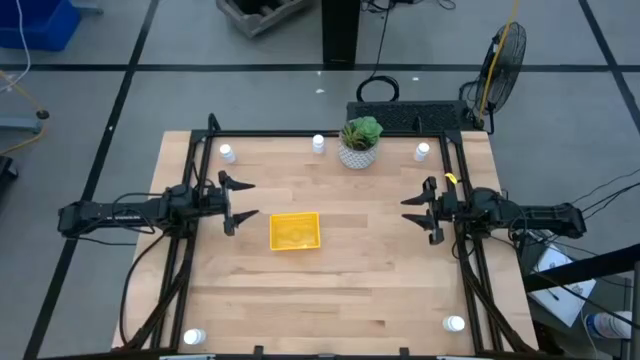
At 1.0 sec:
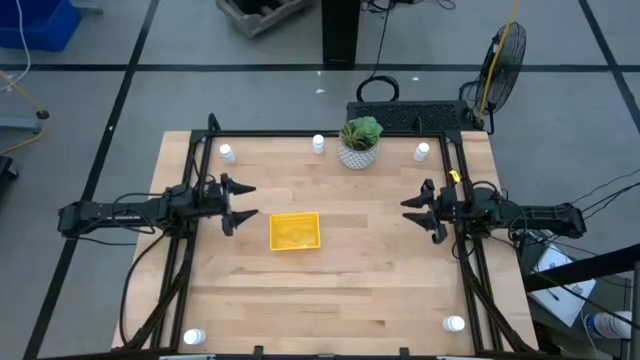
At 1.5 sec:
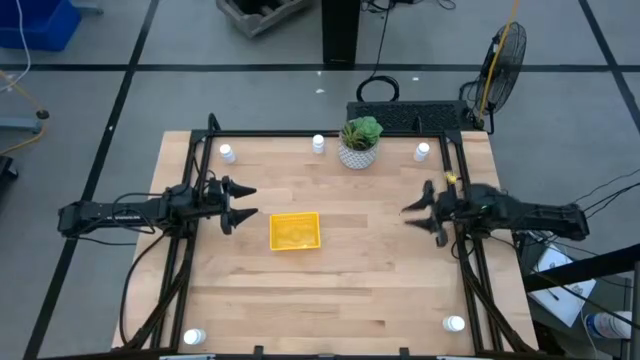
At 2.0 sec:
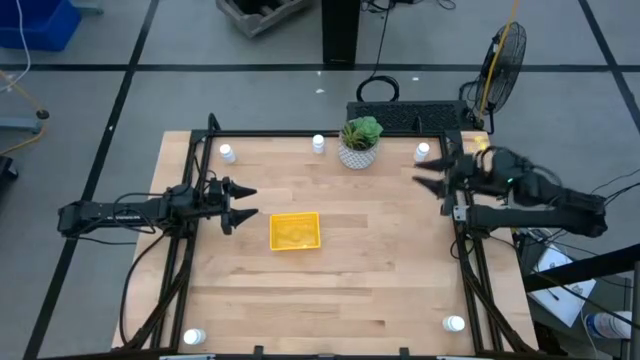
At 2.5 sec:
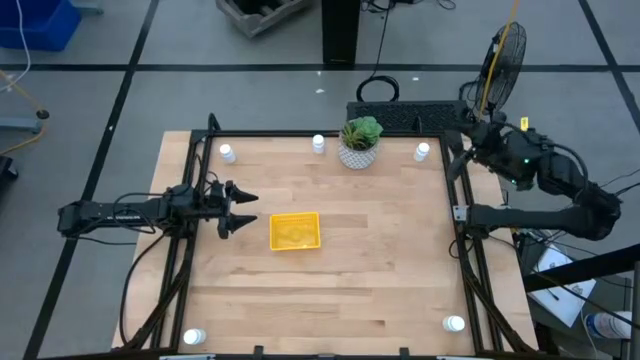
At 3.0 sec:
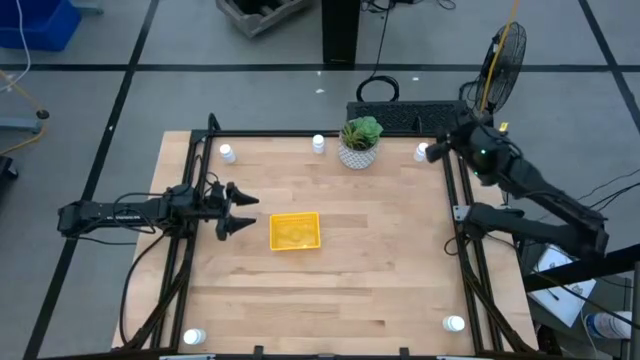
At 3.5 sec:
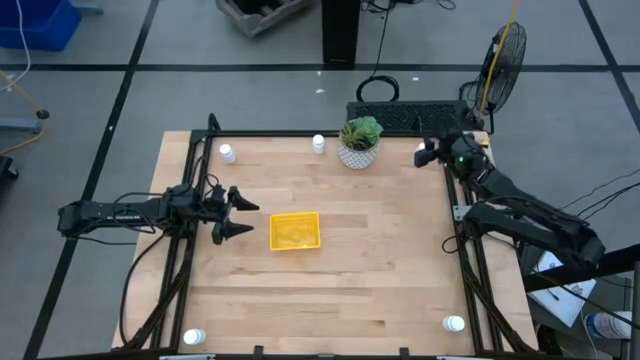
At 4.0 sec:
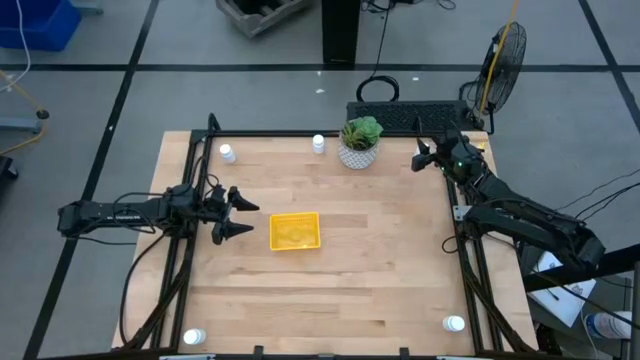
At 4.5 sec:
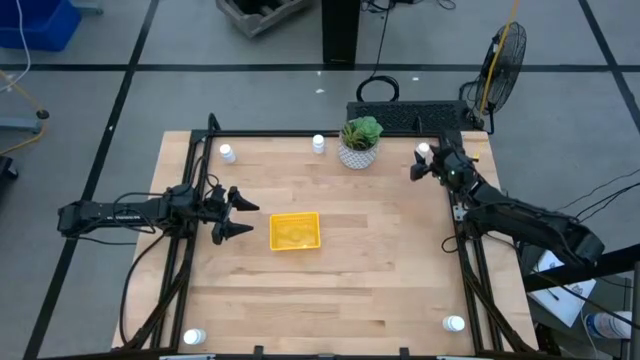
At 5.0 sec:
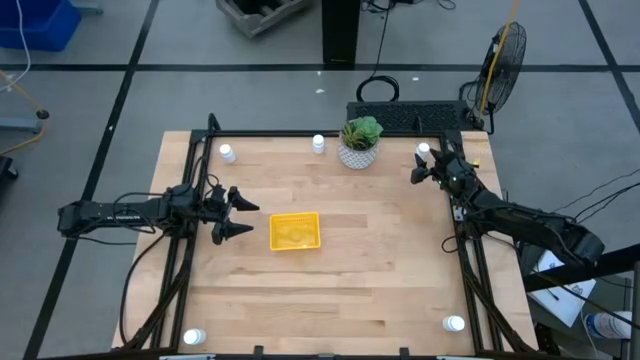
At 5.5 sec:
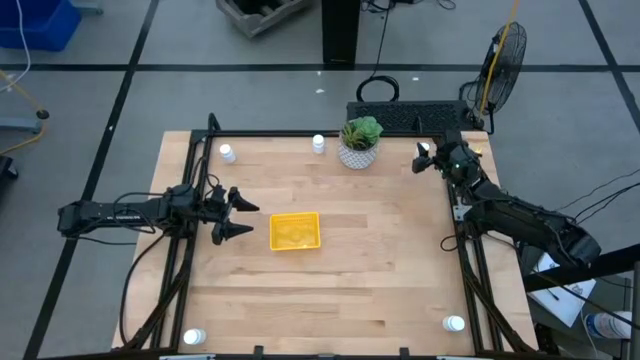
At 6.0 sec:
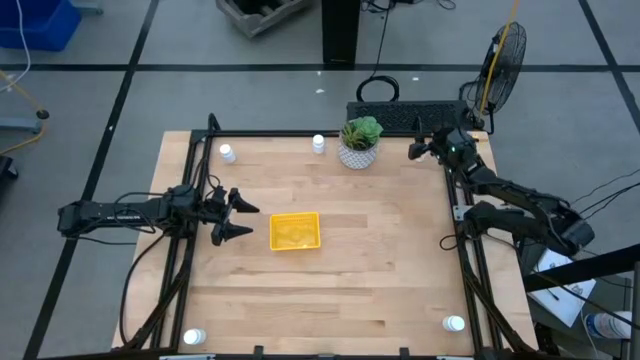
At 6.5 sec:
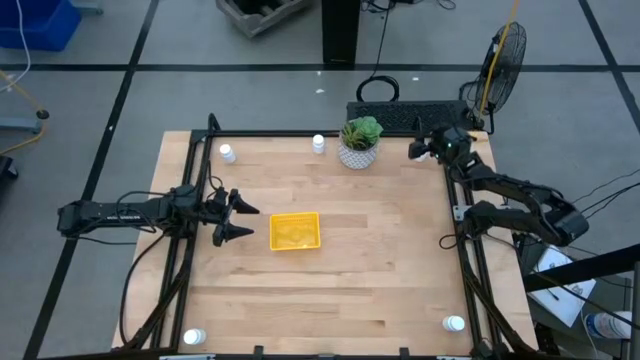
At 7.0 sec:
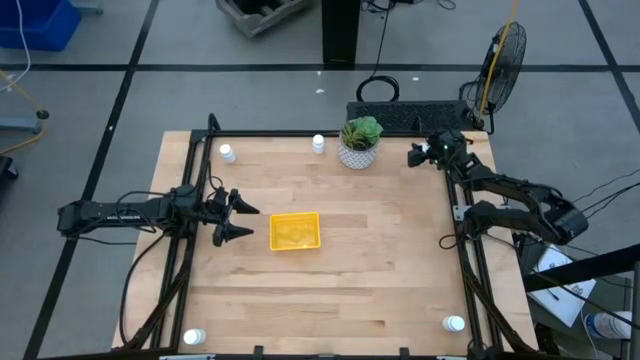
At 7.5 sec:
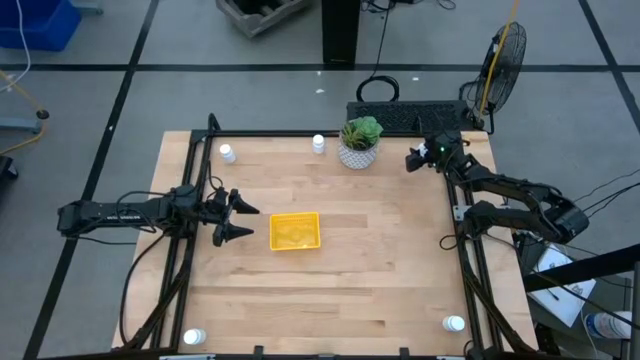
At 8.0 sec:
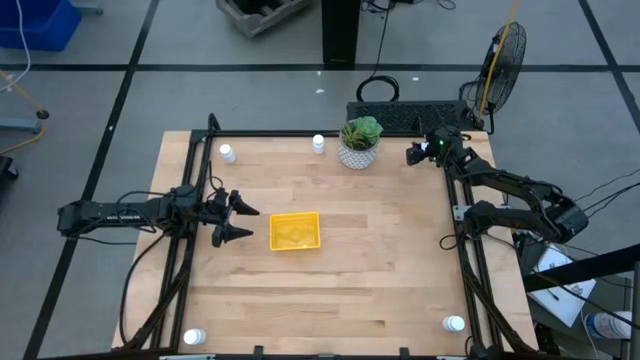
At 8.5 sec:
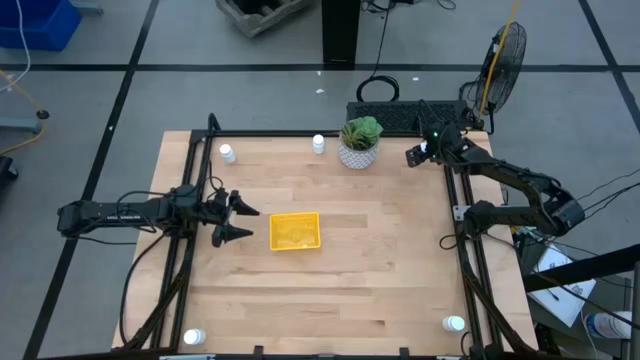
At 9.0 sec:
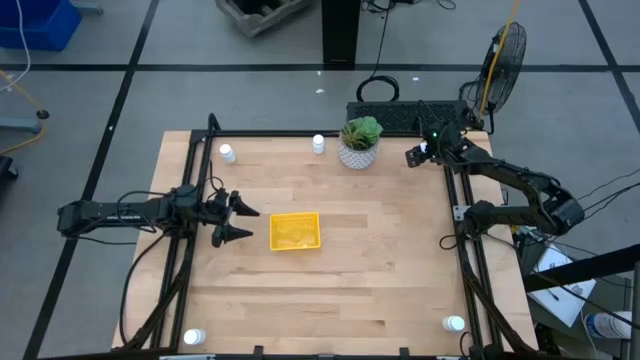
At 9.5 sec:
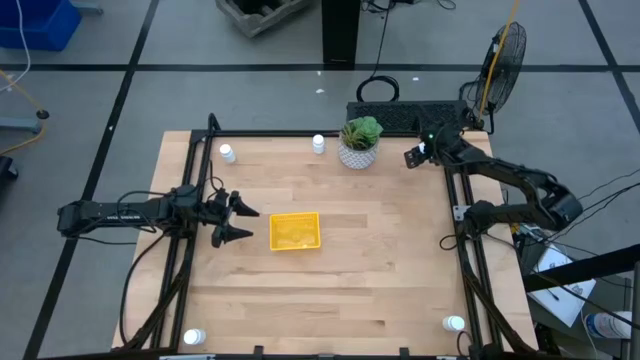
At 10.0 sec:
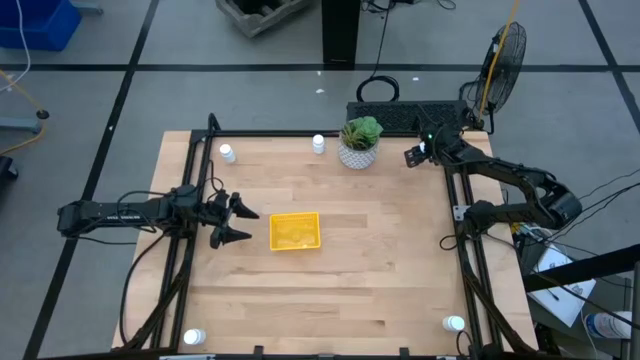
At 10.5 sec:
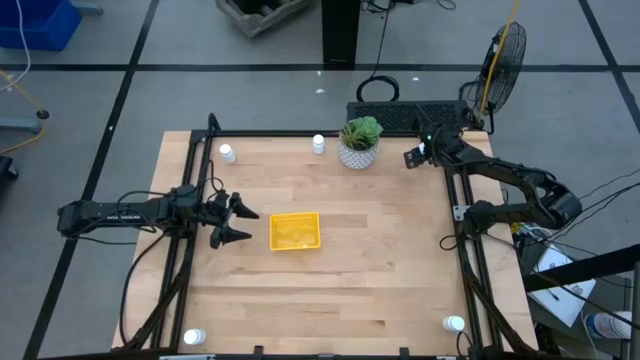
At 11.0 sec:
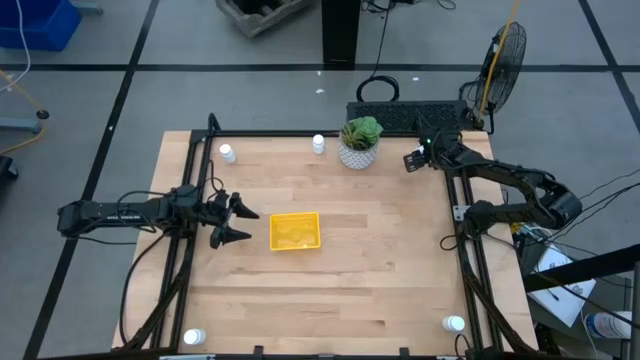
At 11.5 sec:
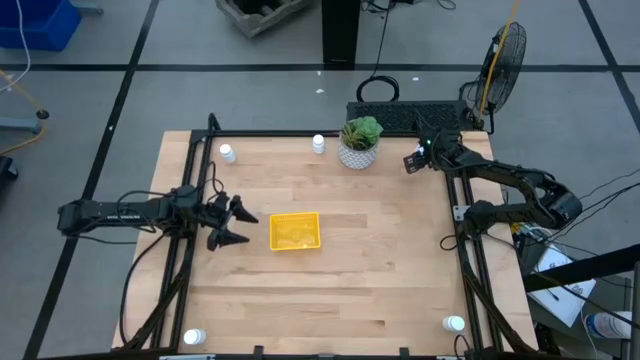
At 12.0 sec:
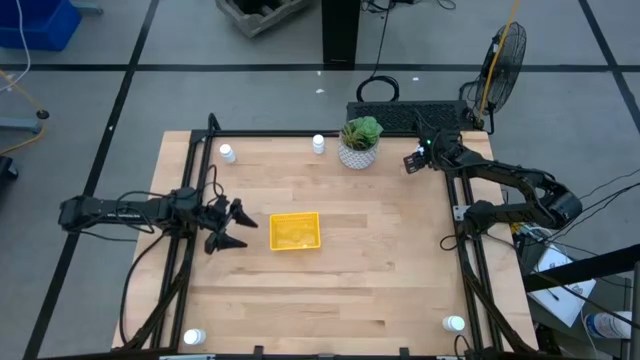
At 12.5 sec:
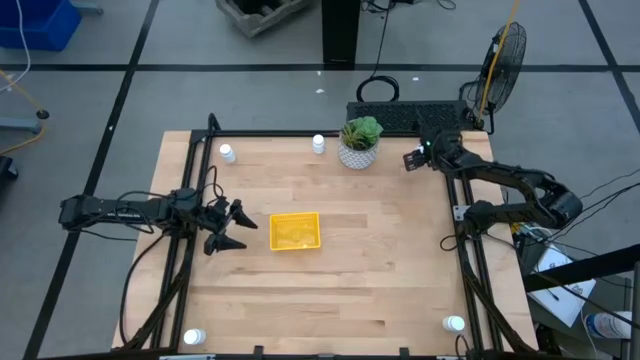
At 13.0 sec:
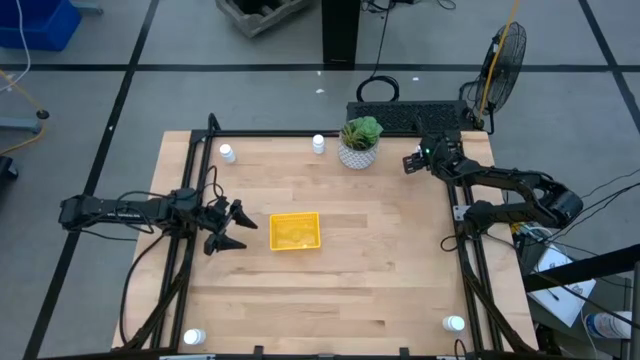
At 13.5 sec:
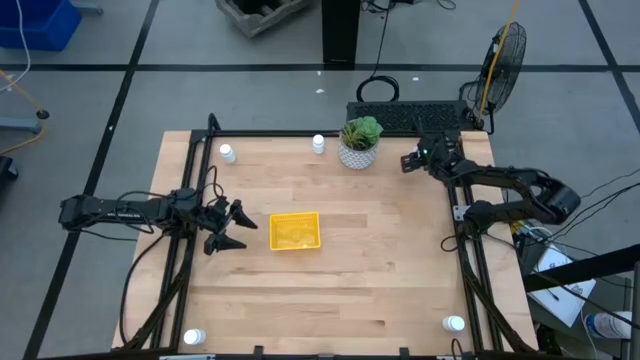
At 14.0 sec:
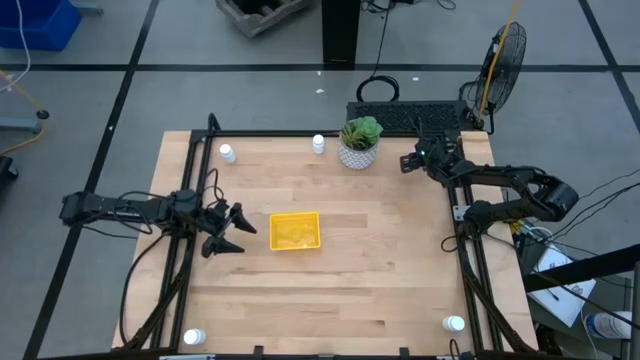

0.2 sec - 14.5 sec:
Task: Pick and place pill bottles into a basket
Put the white pill bottle into the yellow bin
